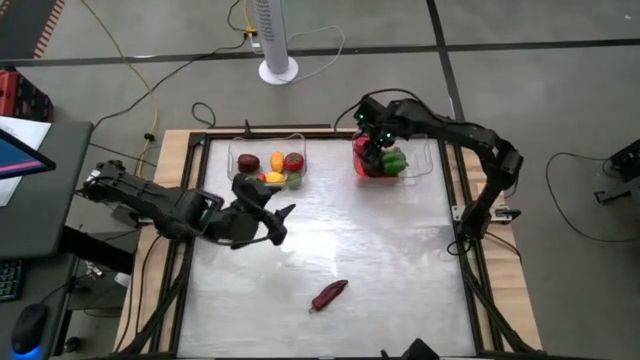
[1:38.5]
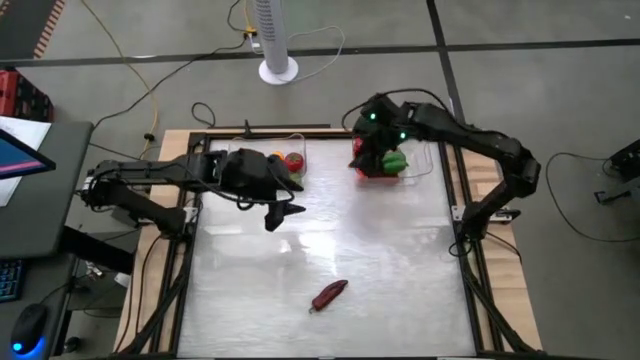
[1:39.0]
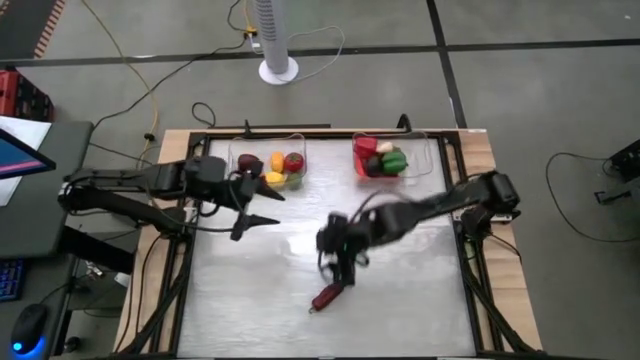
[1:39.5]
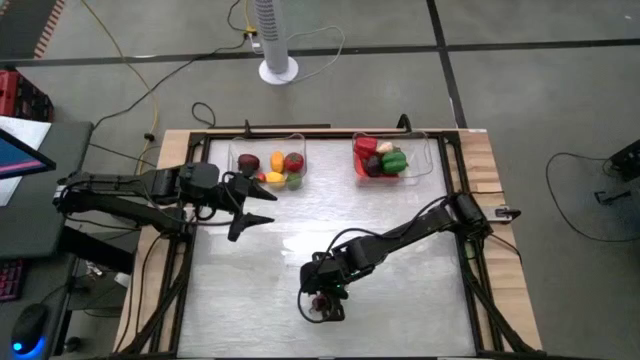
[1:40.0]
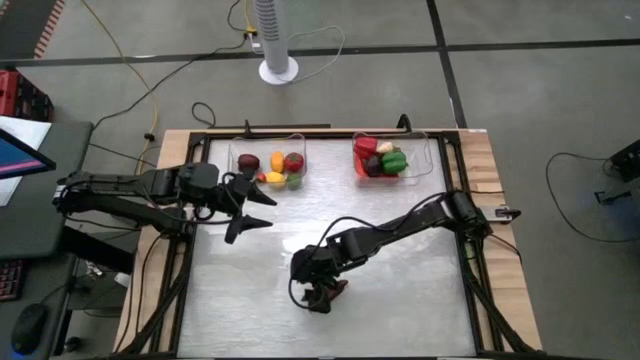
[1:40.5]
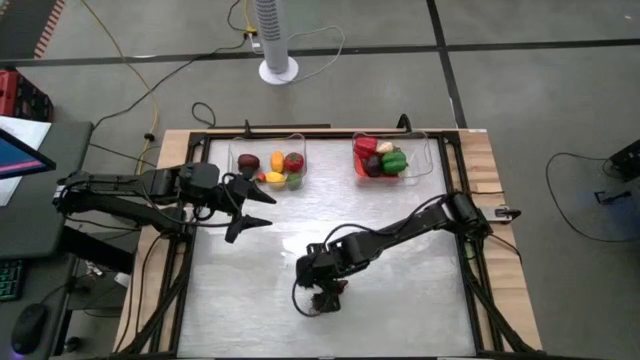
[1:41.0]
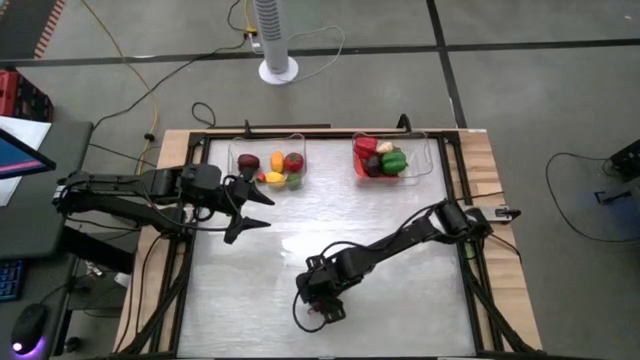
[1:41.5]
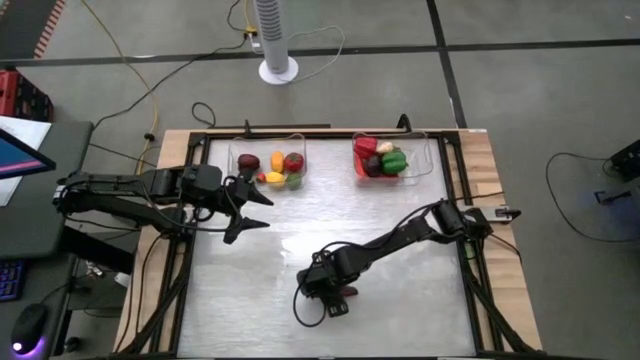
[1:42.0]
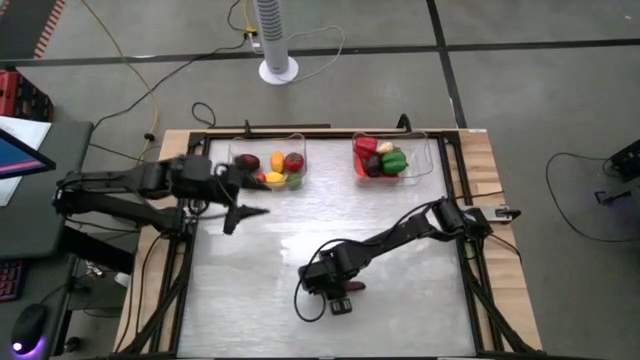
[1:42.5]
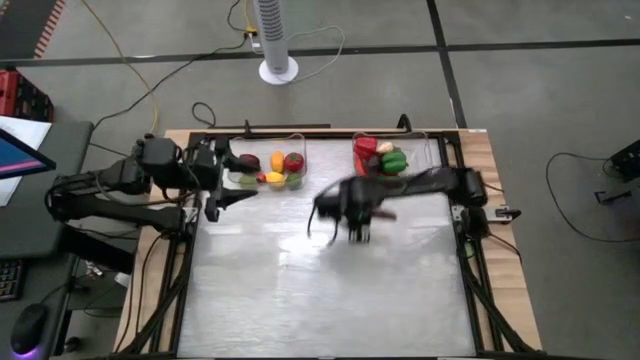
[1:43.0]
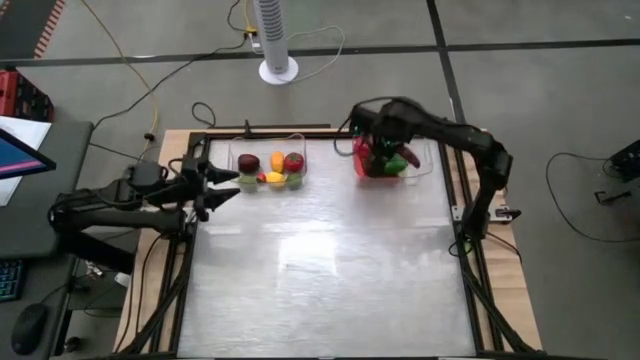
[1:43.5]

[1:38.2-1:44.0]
Task: Sort produce into baskets
Put the dark chili pepper into the right transparent bin

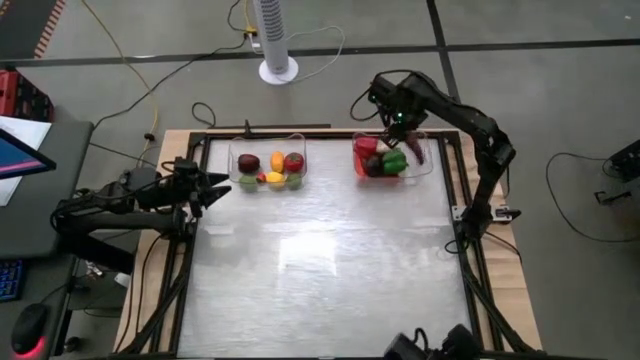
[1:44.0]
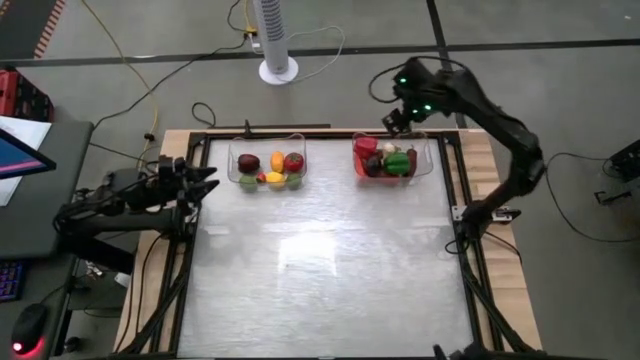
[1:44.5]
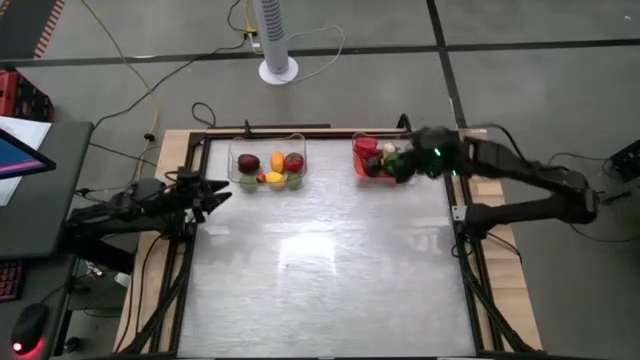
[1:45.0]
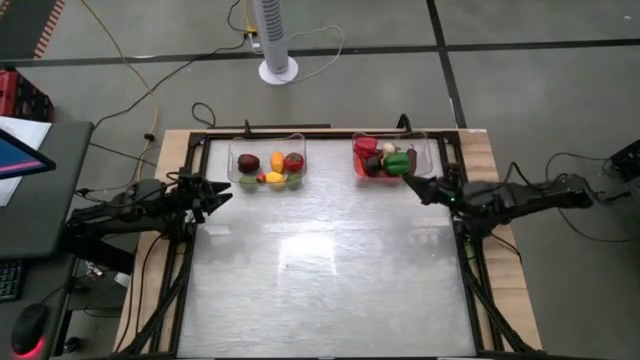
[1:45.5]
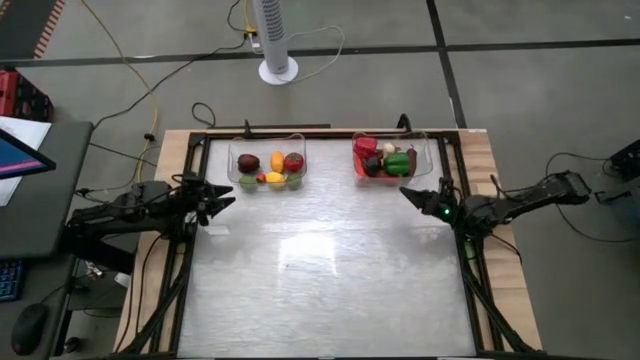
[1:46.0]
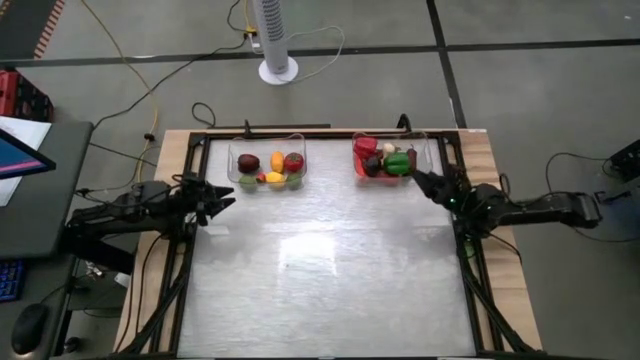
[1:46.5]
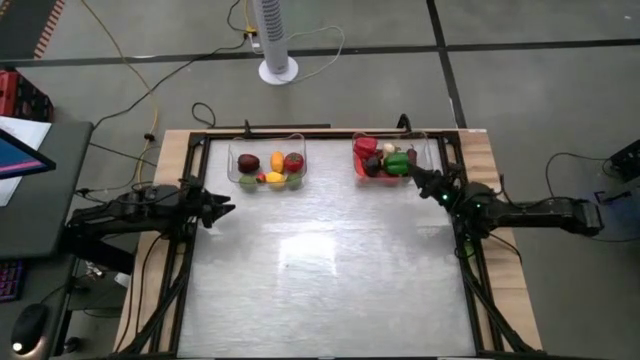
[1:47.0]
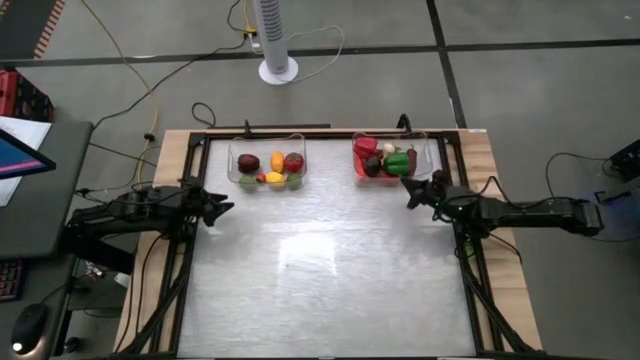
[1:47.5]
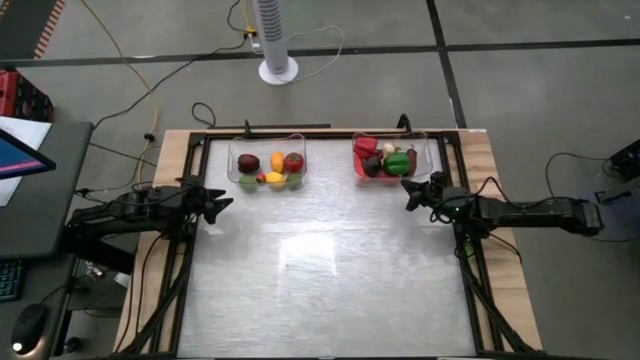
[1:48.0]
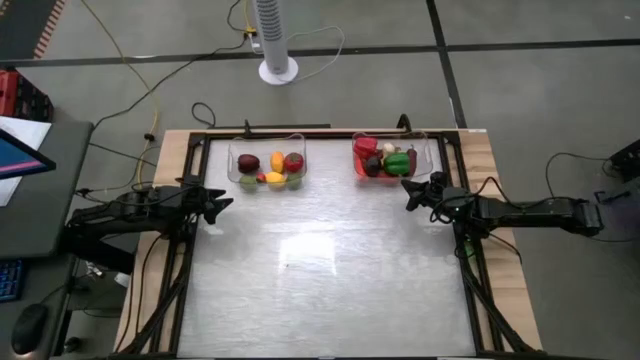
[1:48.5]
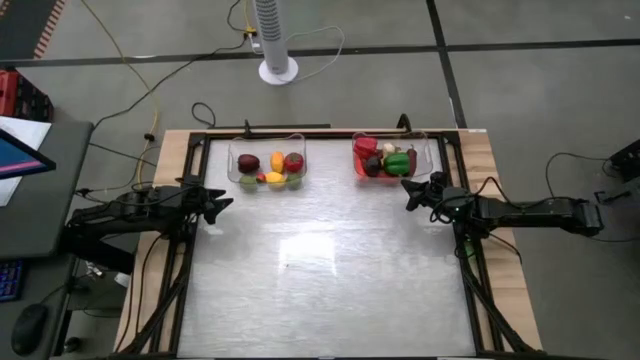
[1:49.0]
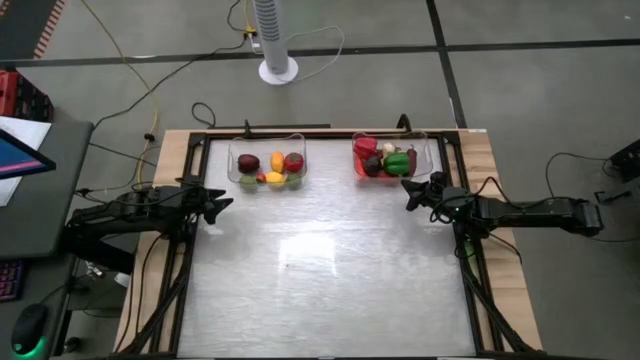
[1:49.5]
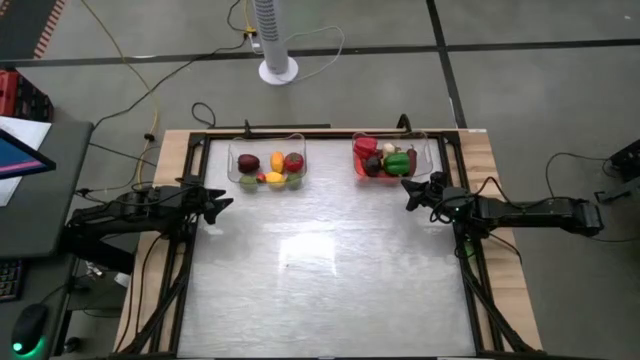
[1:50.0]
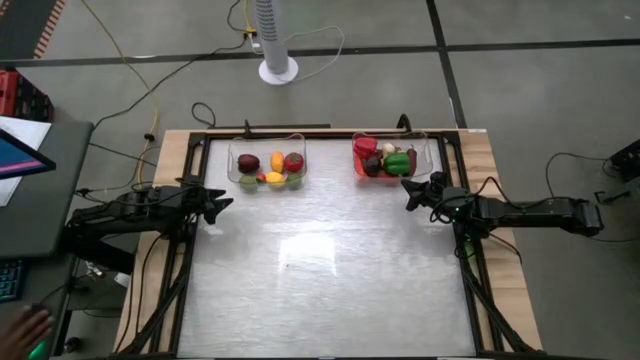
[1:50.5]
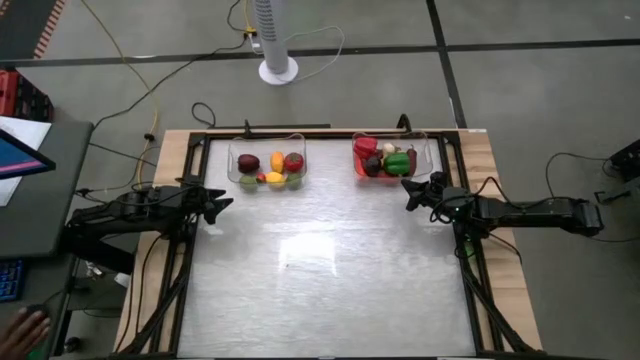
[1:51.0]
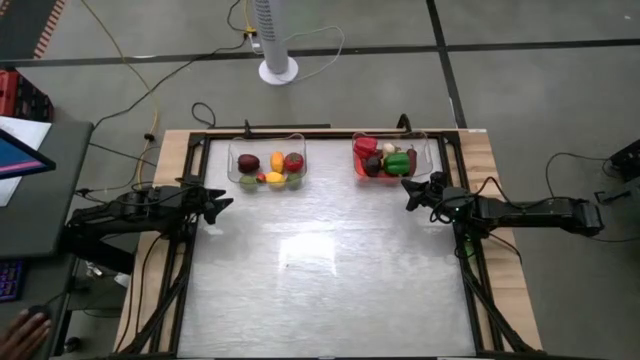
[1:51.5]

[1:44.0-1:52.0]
Return to Home Position

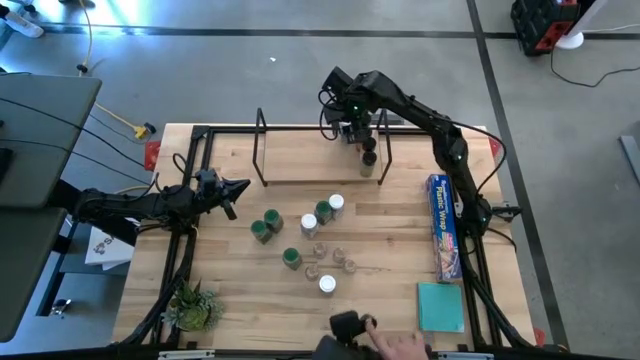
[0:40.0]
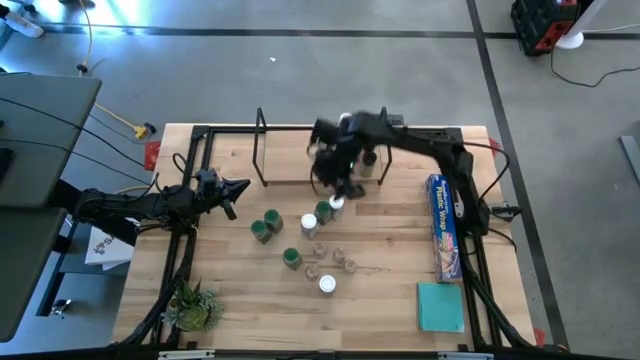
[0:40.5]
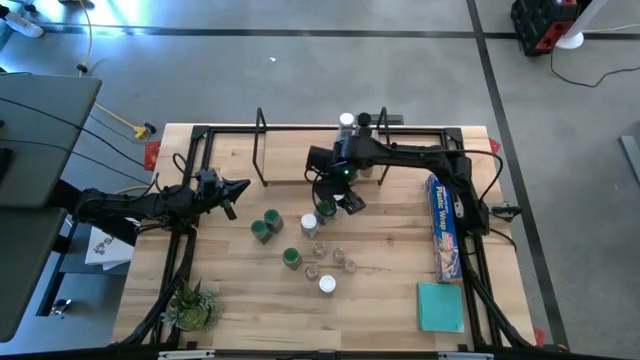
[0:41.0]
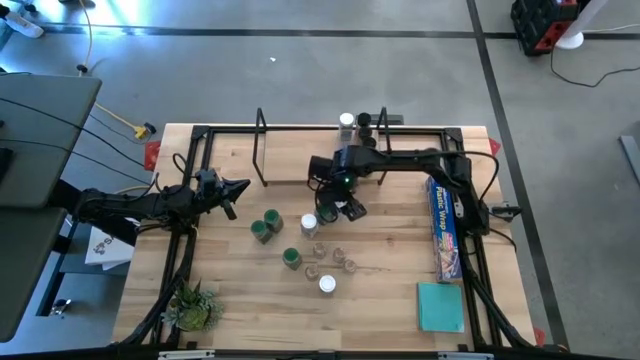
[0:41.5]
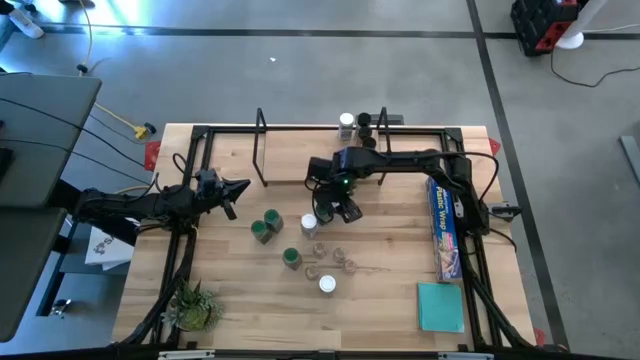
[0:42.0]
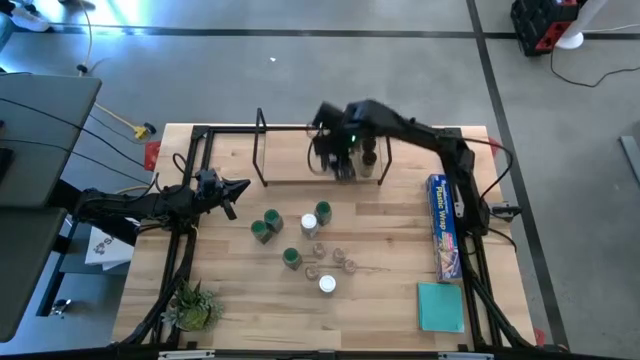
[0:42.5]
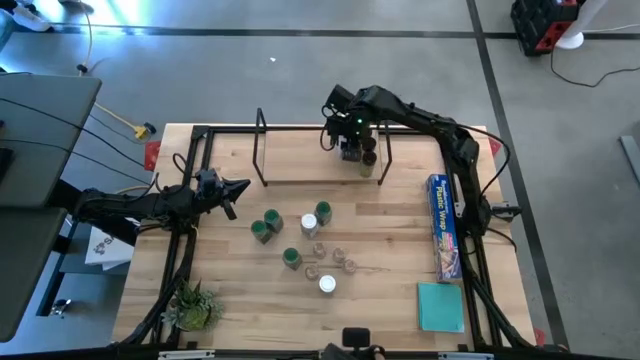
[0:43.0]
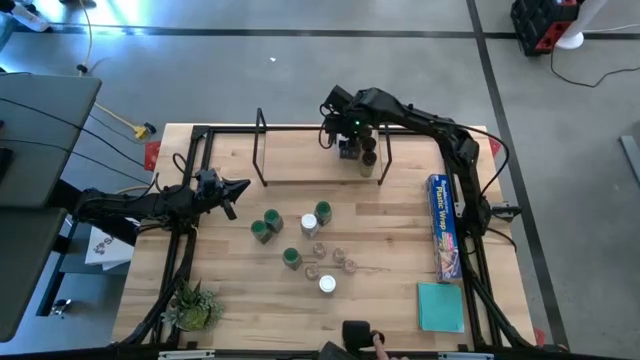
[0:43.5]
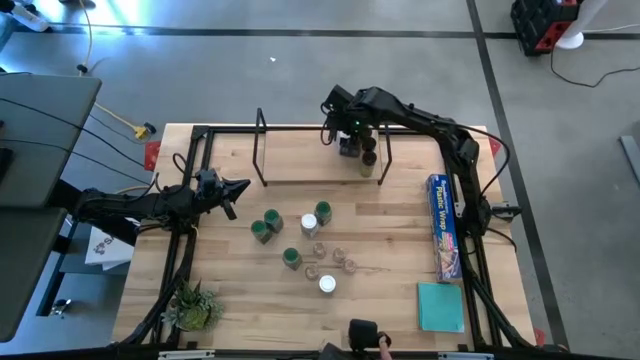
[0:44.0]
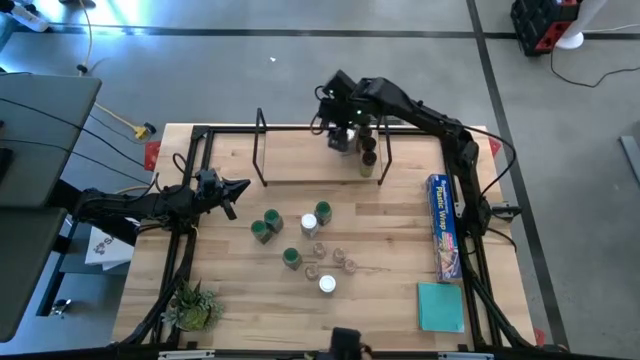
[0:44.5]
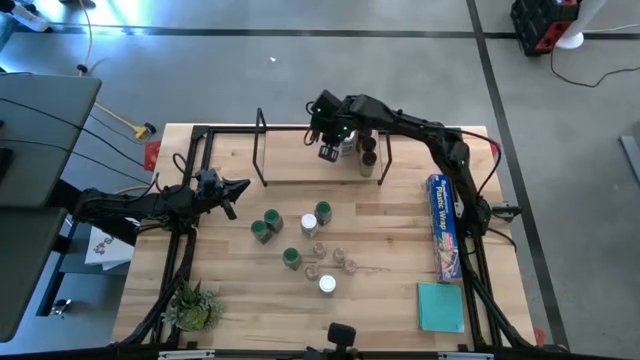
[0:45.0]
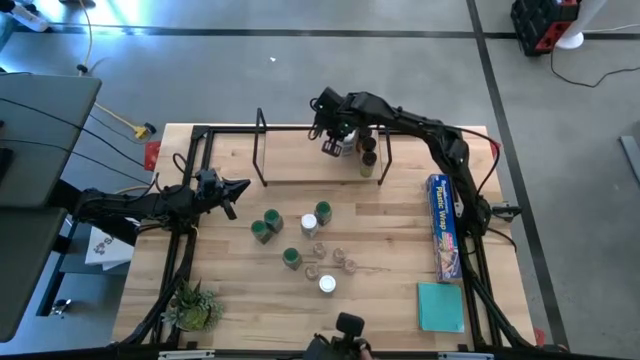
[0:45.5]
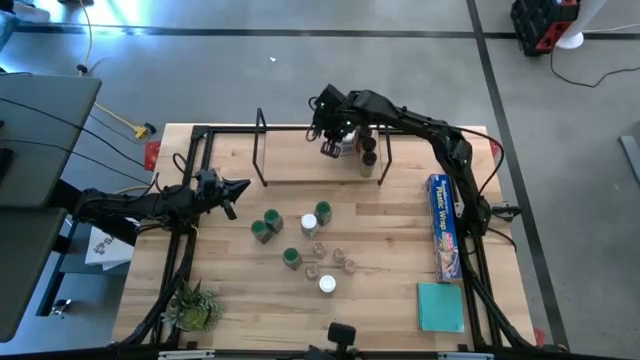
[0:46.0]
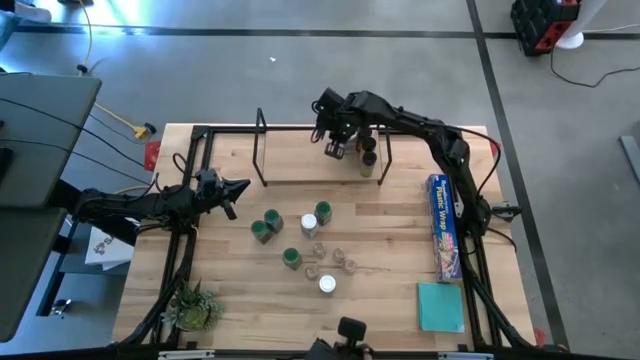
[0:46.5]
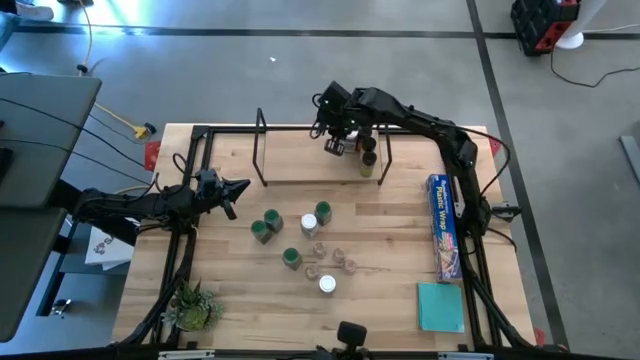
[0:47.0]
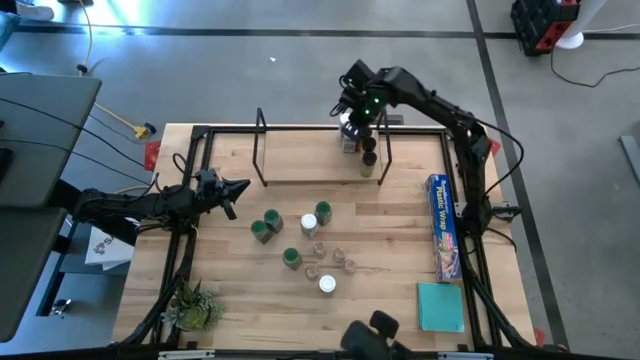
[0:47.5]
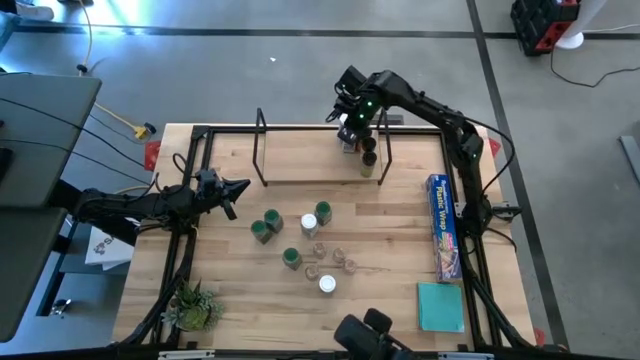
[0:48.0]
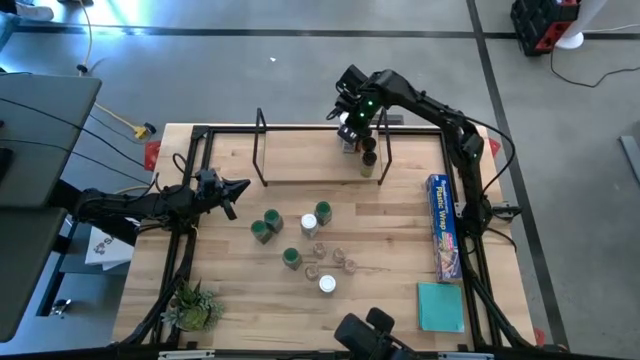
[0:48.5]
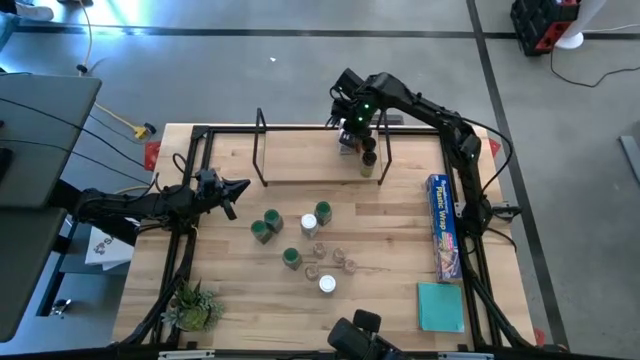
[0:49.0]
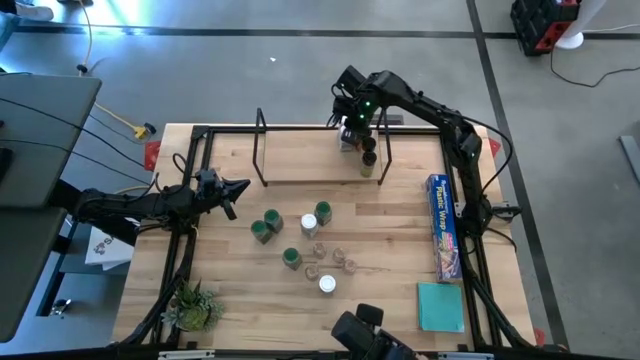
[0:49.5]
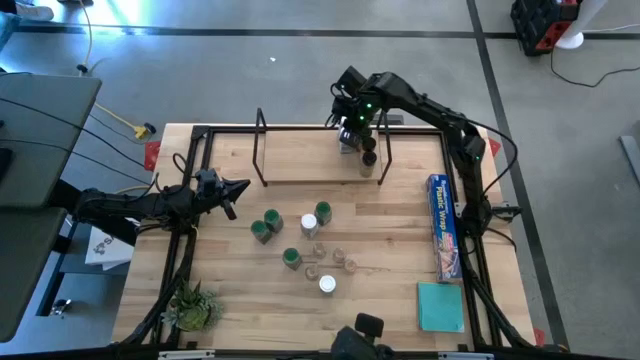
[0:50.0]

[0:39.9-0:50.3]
Task: Shelf spices
Put the top white seasoning bottle on the shelf and align with the other white seasoning bottle
